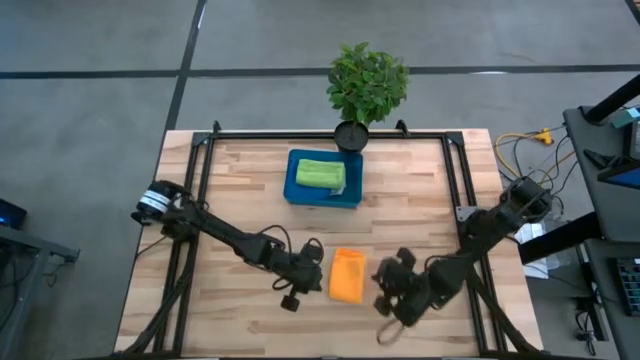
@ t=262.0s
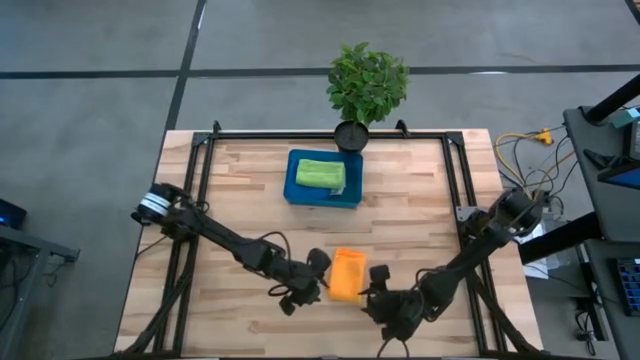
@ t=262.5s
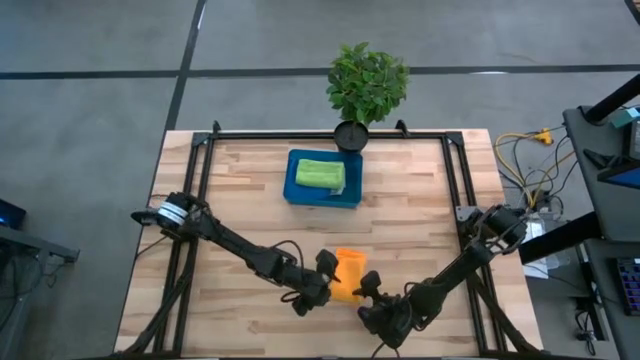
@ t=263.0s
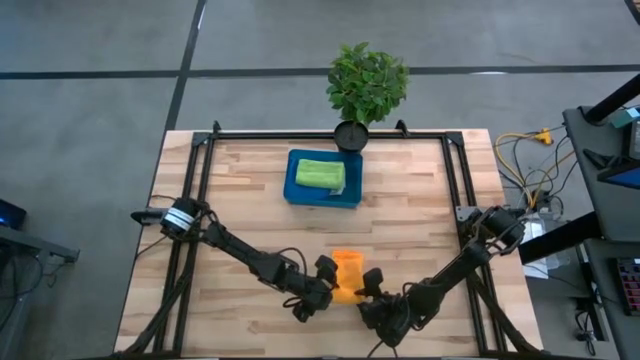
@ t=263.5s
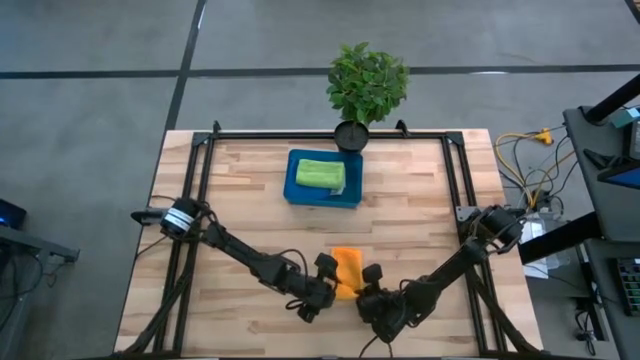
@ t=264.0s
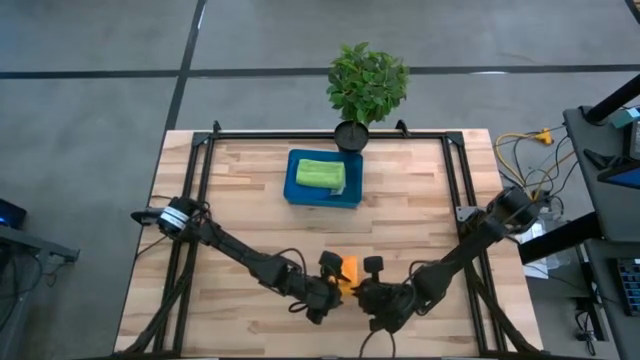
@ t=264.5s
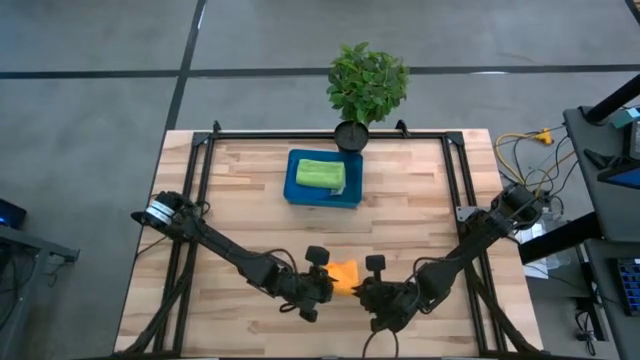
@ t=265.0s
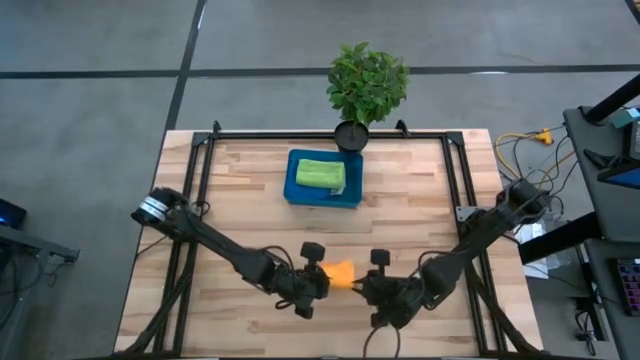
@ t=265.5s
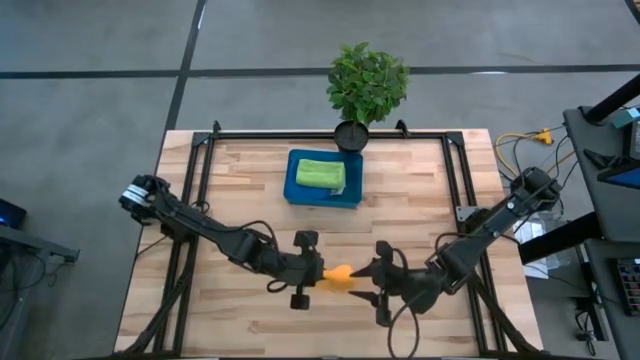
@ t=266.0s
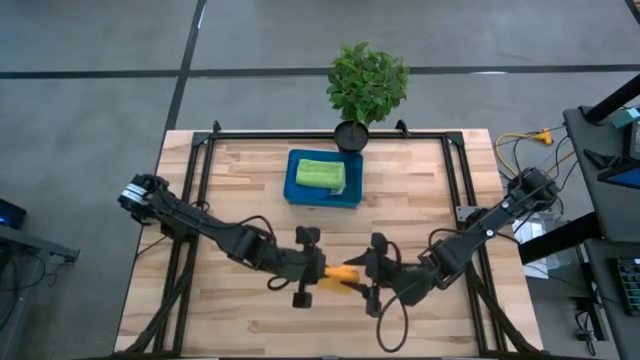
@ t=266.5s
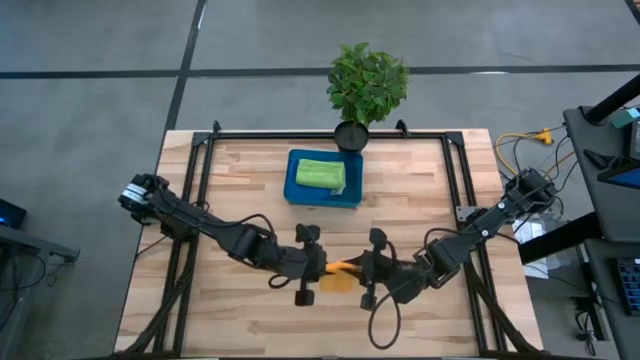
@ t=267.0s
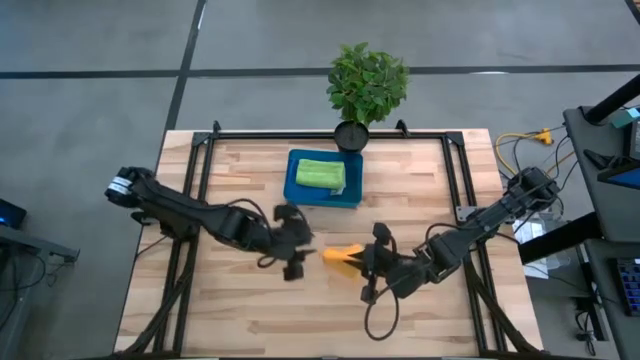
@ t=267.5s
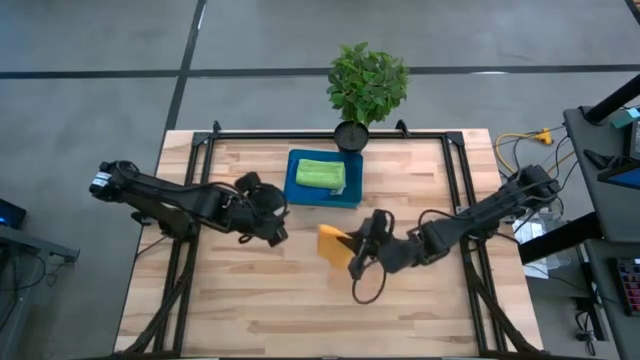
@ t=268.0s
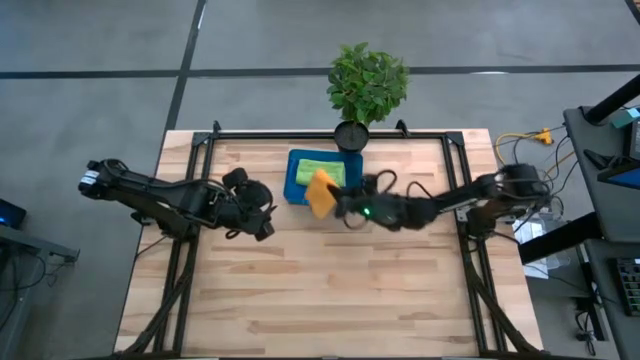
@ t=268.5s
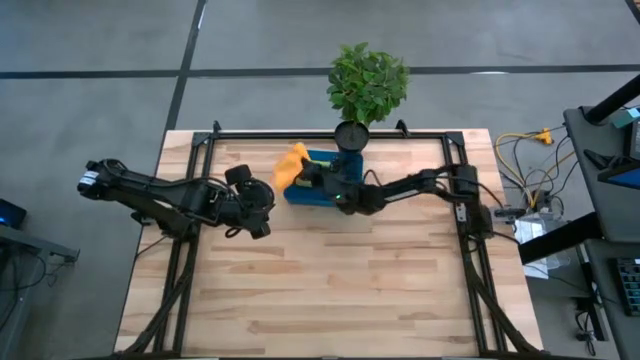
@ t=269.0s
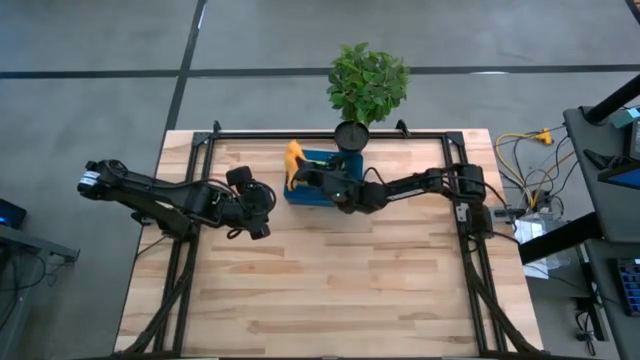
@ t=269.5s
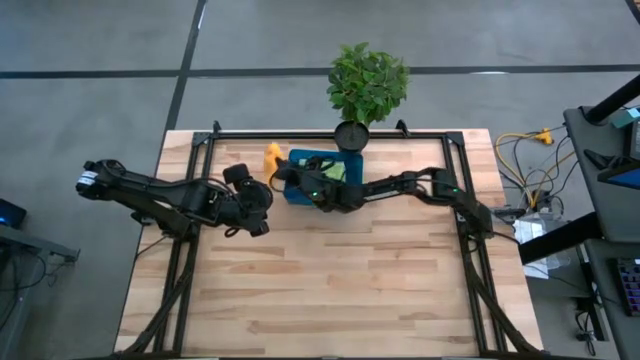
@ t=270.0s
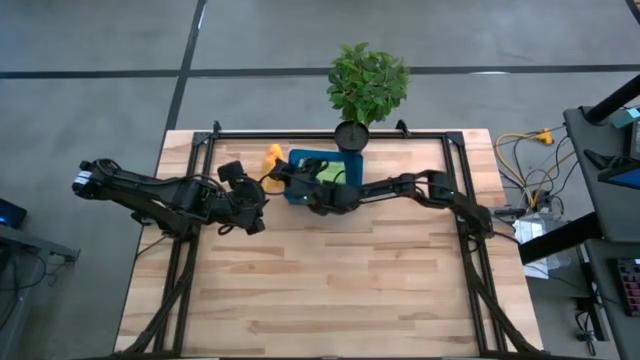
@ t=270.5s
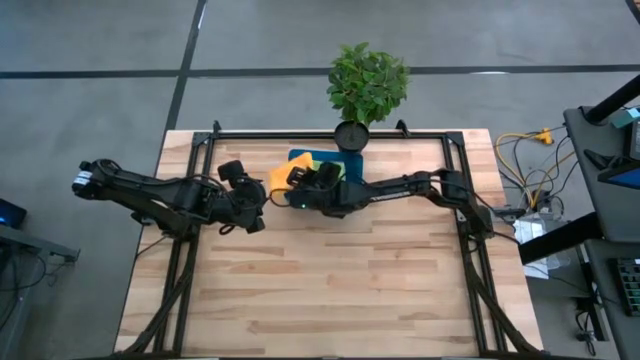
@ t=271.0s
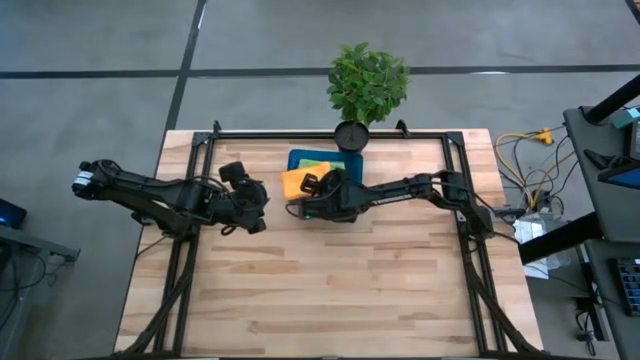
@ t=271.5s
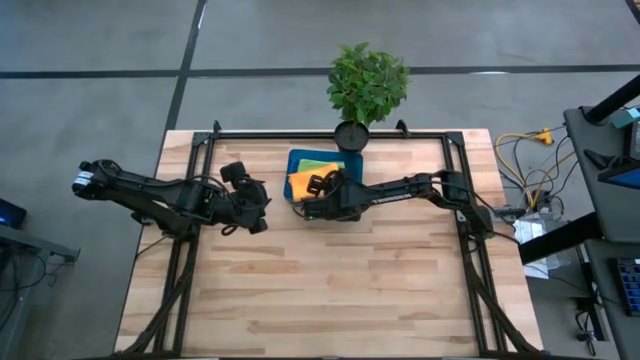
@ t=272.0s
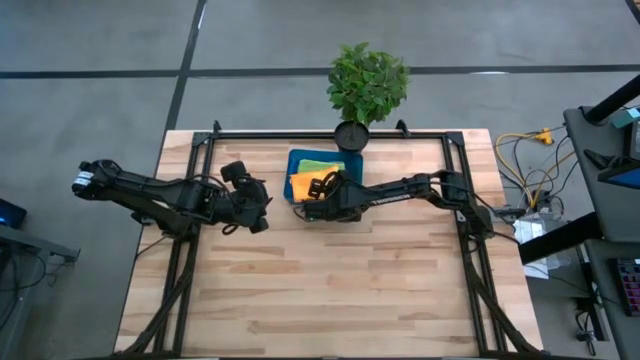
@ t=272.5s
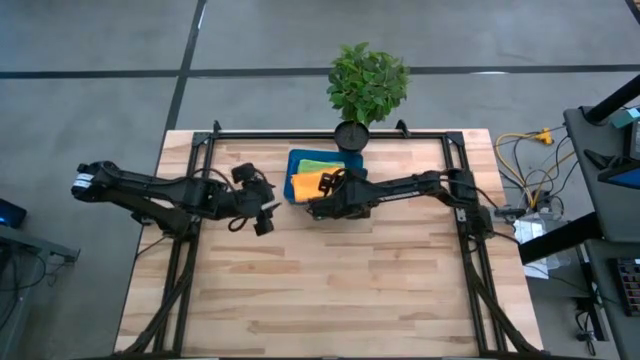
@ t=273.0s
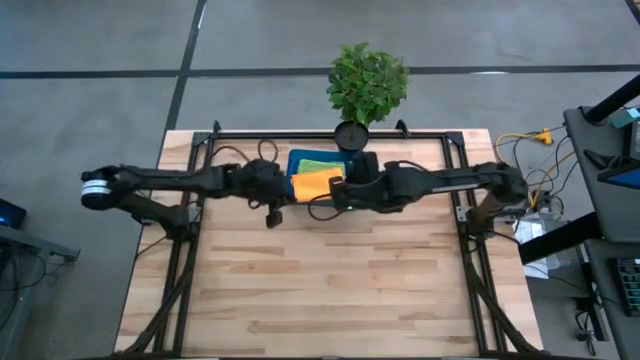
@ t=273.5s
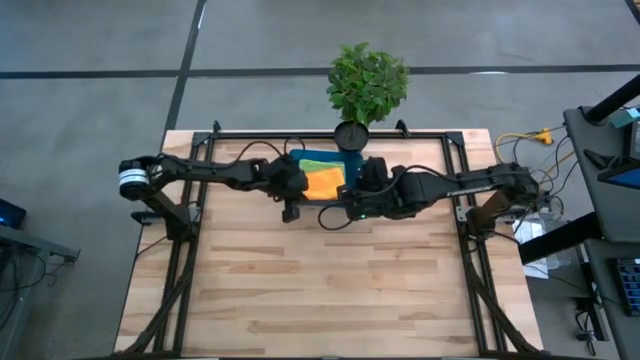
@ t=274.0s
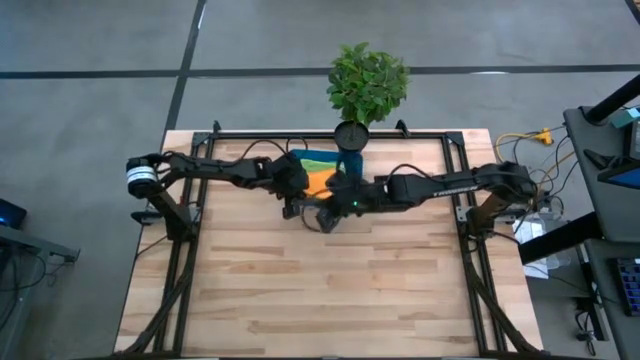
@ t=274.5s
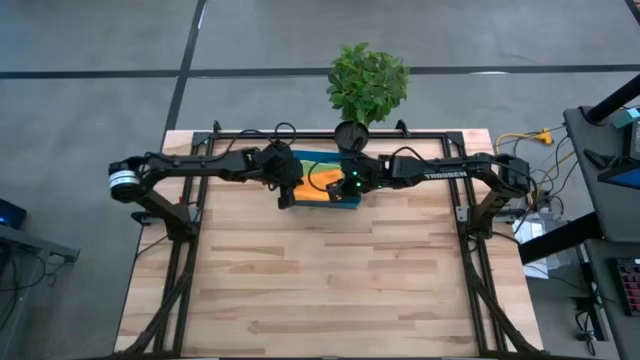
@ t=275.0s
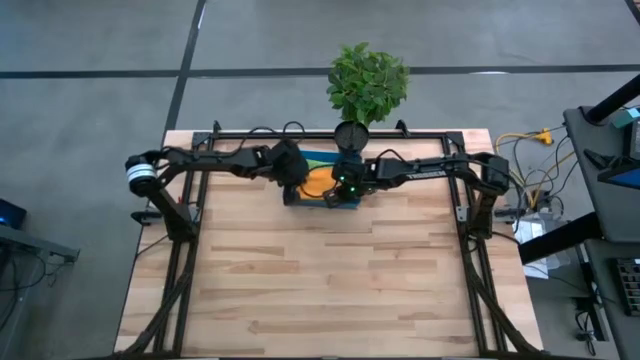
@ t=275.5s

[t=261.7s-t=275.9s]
Task: Fold microfiber towels
Put the yellow microfiber towel into the blue bin

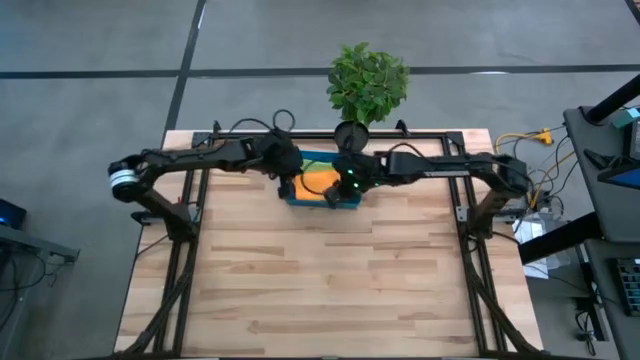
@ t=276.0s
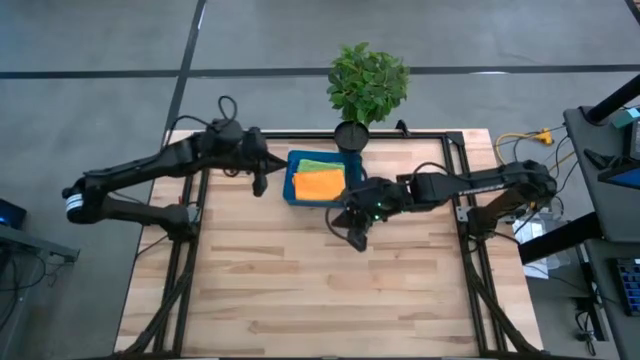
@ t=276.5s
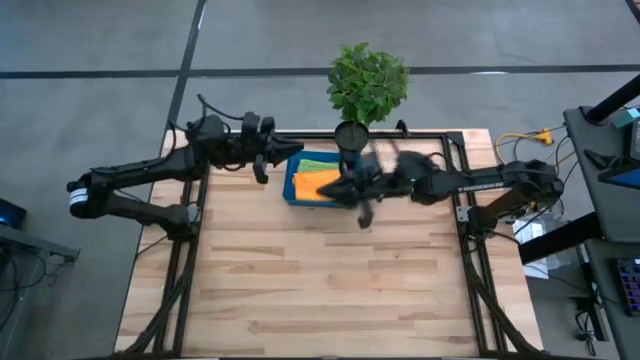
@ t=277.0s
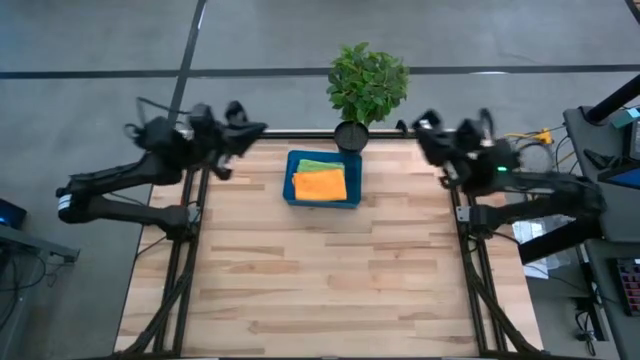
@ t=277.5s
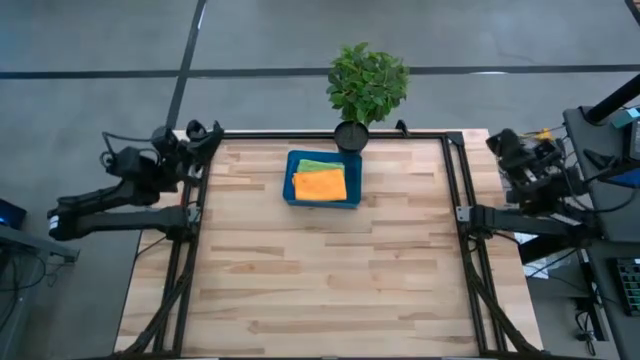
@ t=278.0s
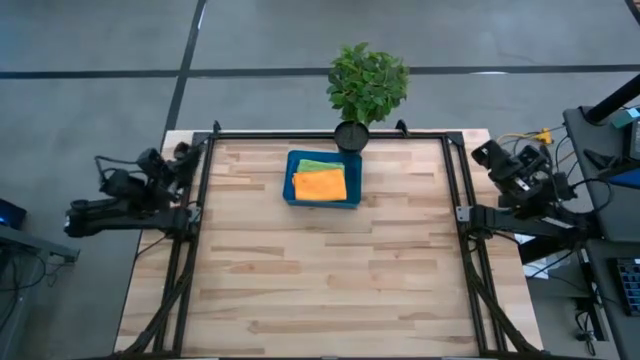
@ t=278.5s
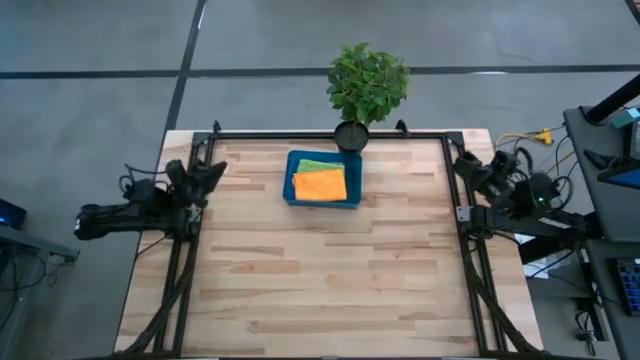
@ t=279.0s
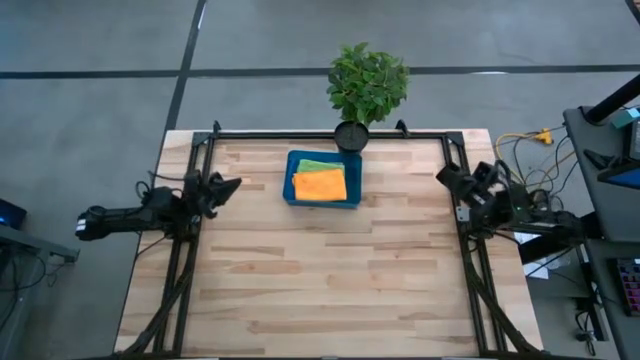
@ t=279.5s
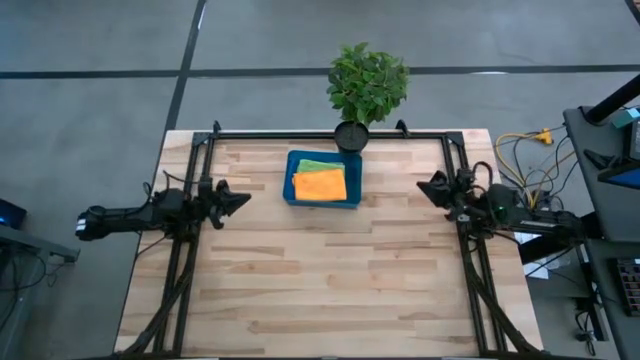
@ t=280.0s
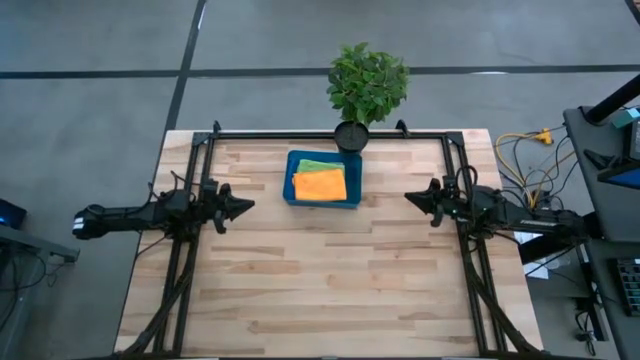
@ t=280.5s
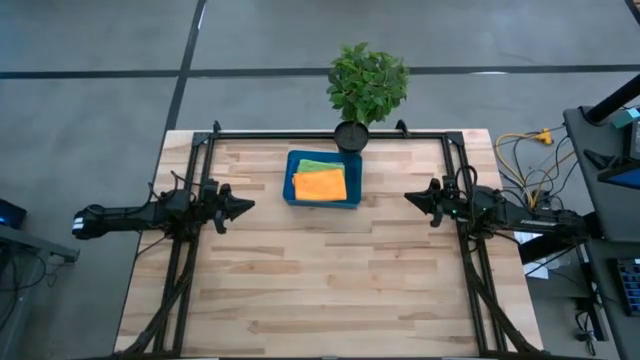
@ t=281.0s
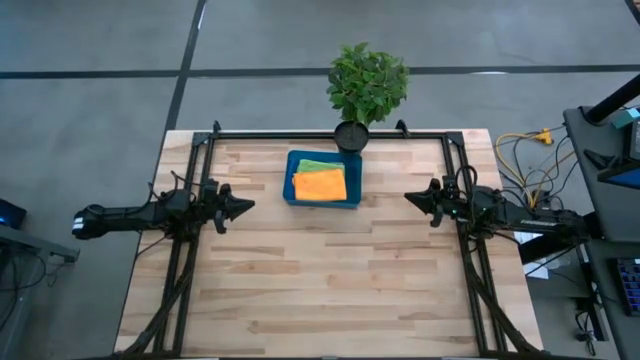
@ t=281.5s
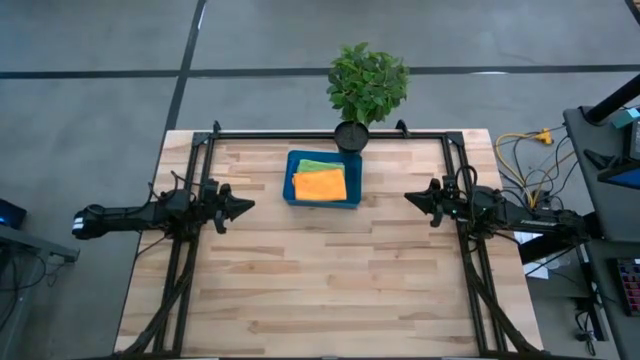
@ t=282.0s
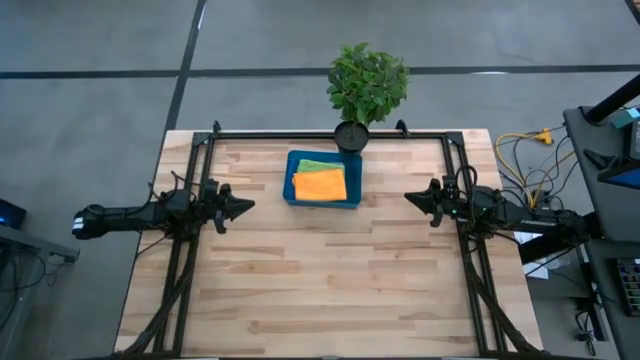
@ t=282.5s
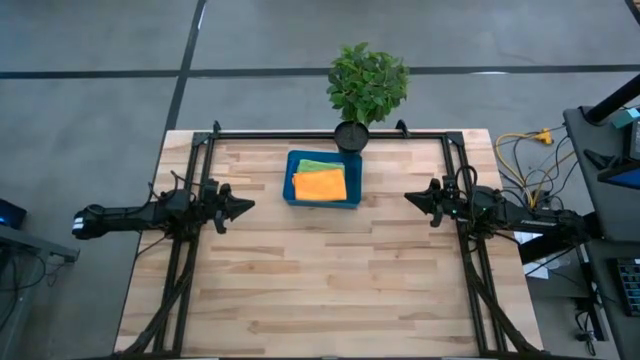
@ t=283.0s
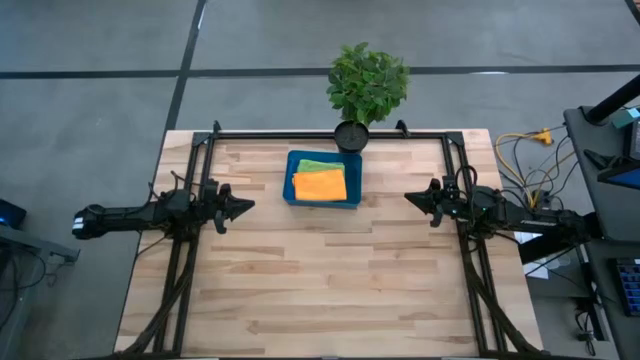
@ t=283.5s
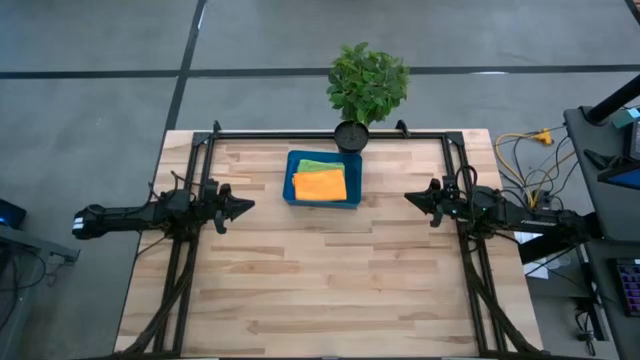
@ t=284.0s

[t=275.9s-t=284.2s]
Return to Home Position
